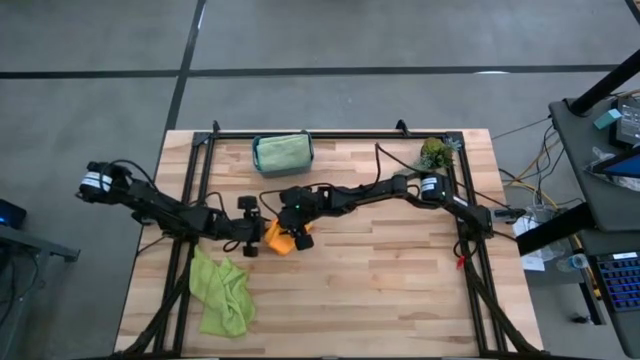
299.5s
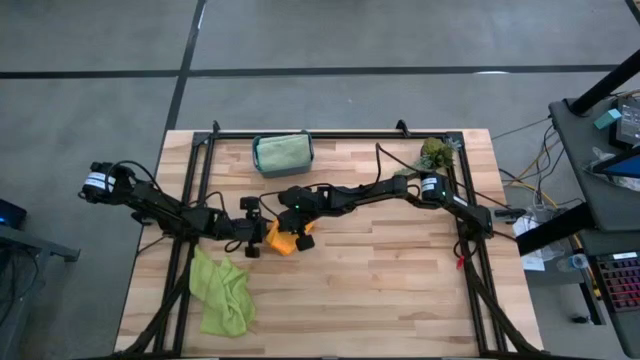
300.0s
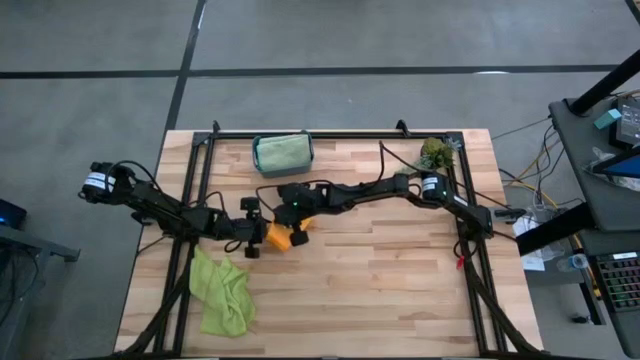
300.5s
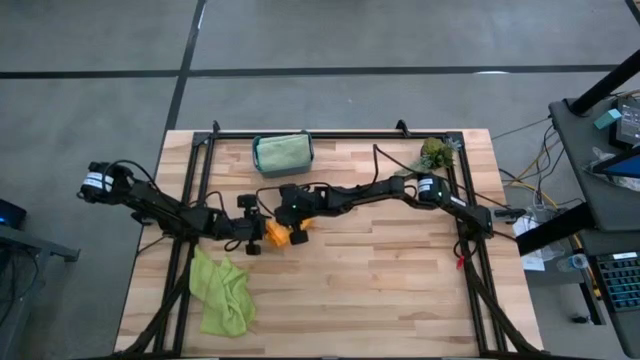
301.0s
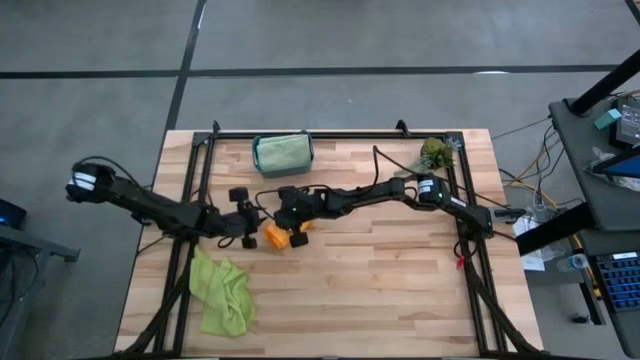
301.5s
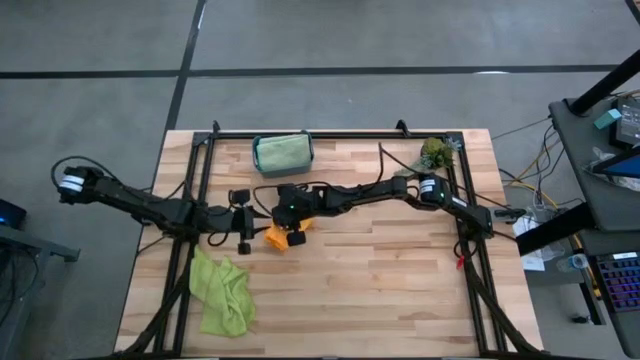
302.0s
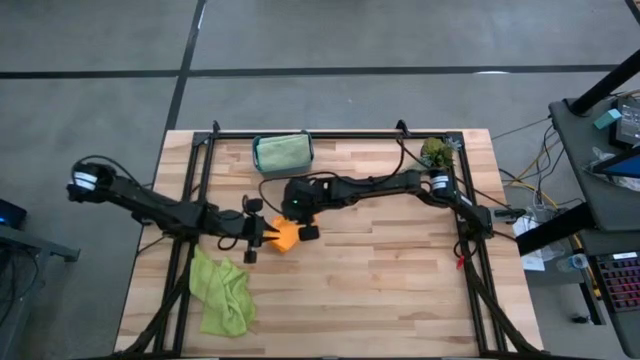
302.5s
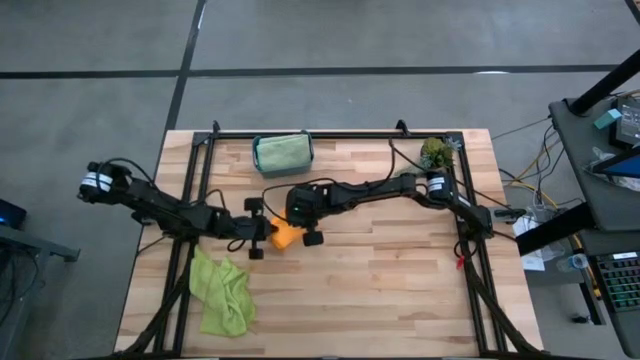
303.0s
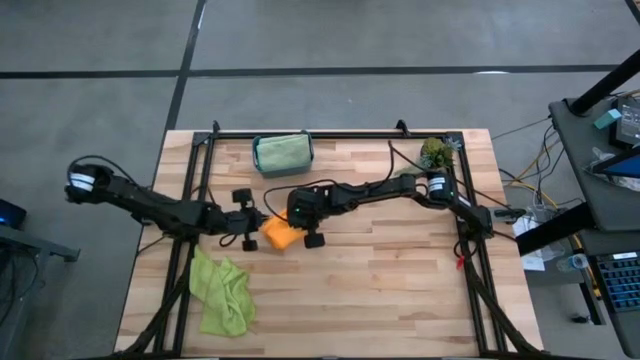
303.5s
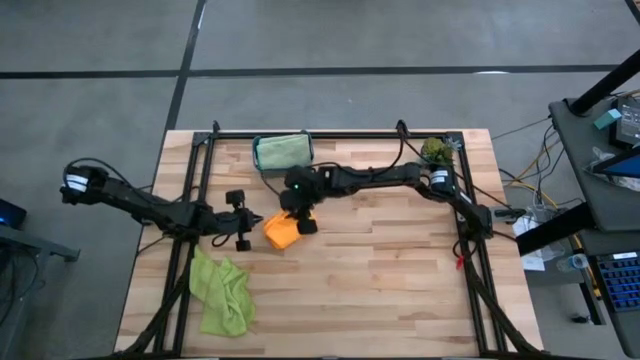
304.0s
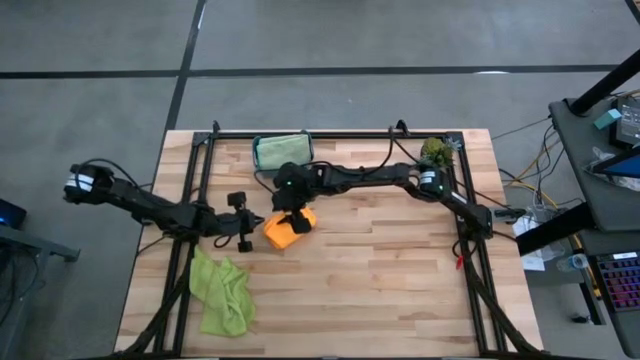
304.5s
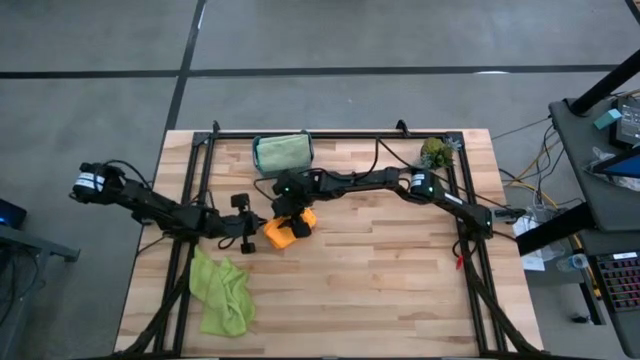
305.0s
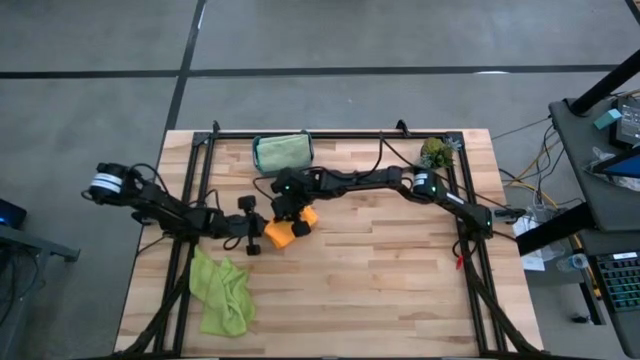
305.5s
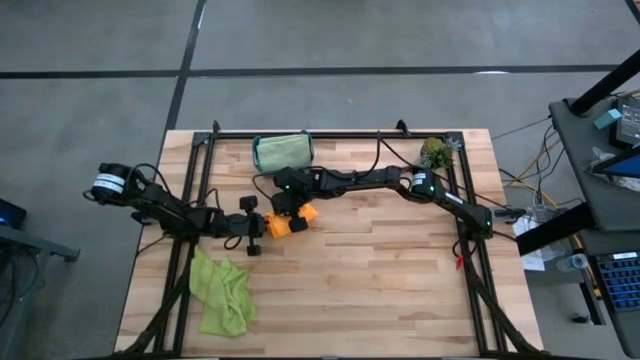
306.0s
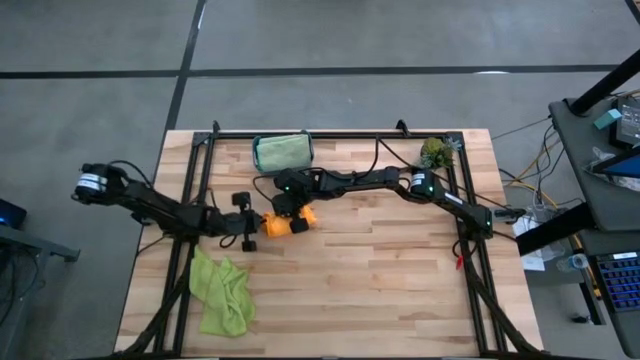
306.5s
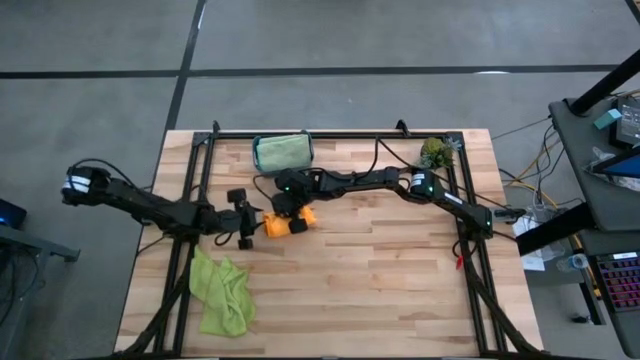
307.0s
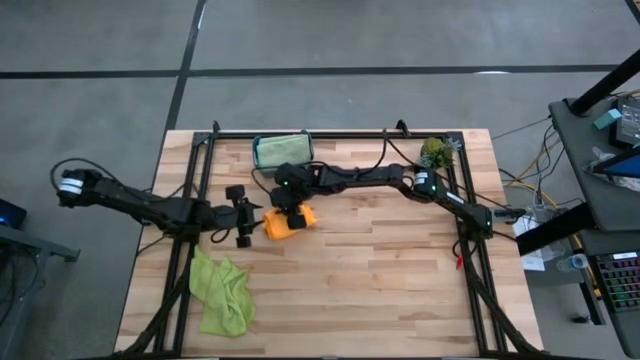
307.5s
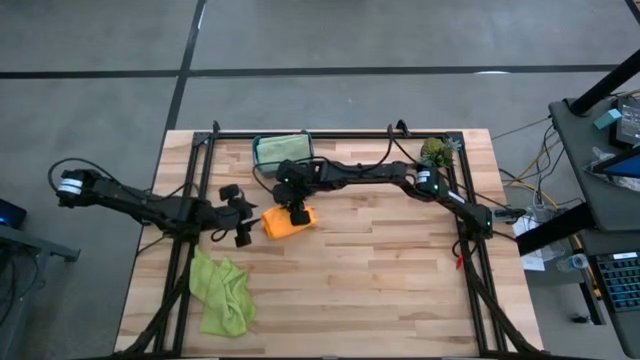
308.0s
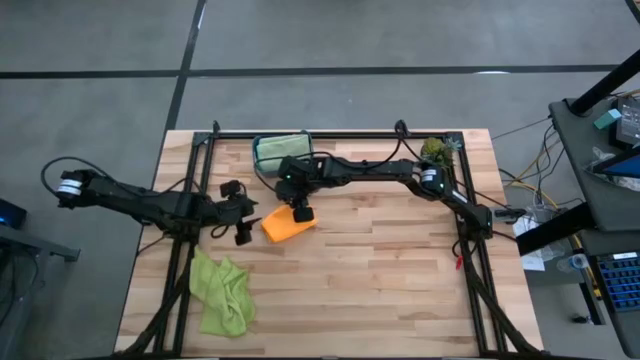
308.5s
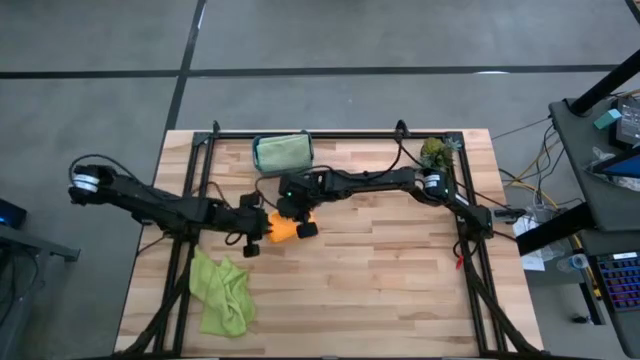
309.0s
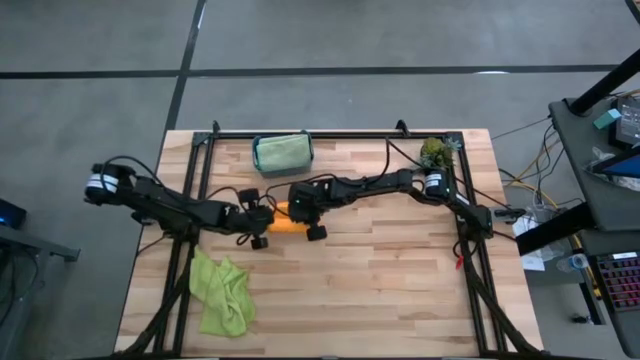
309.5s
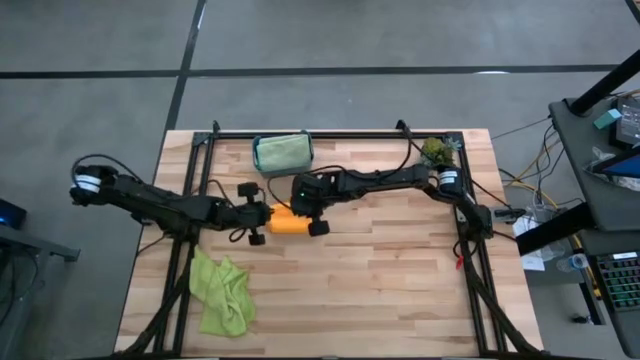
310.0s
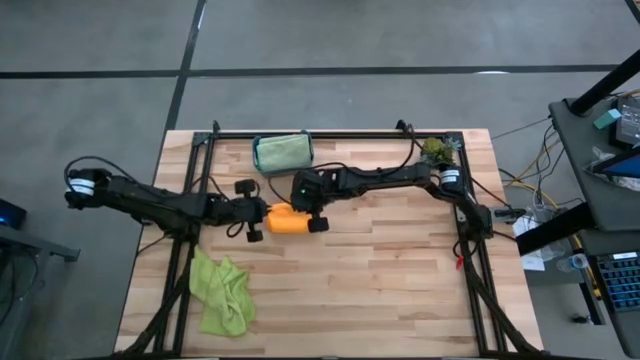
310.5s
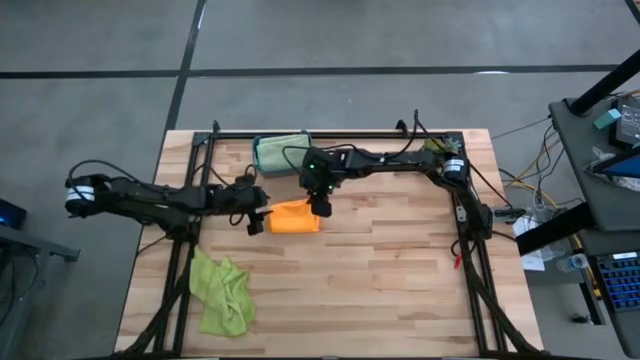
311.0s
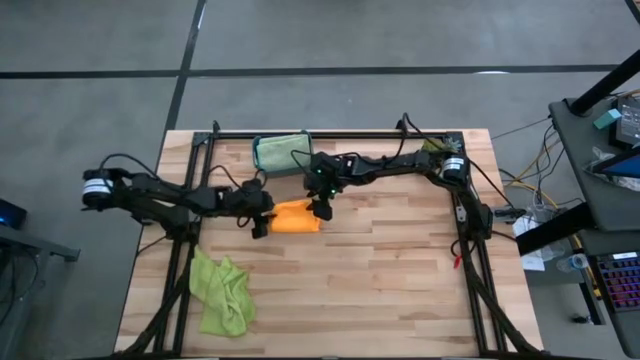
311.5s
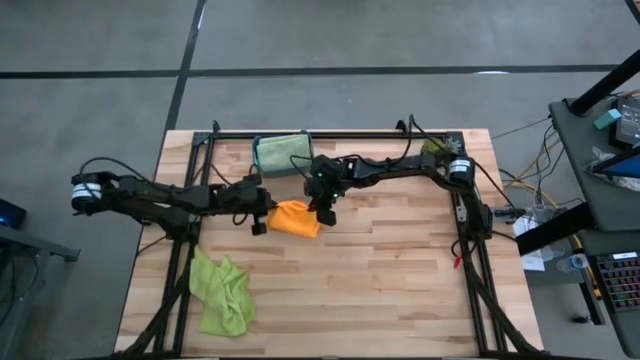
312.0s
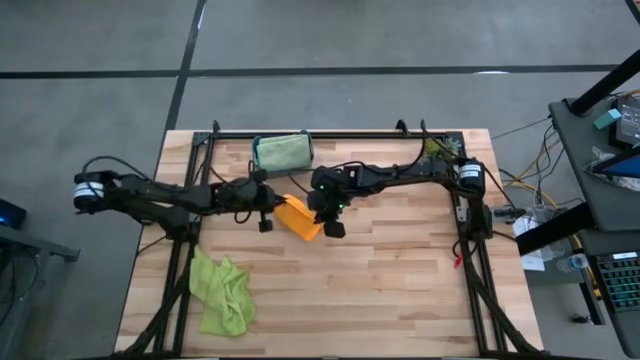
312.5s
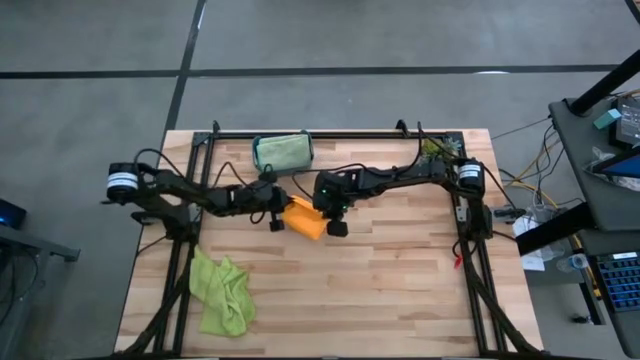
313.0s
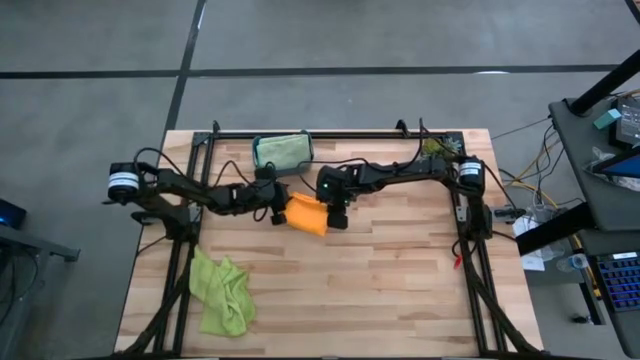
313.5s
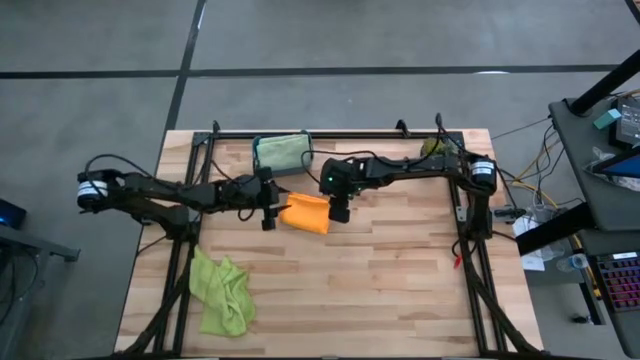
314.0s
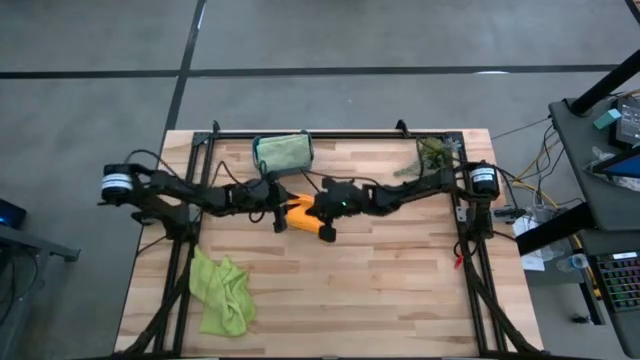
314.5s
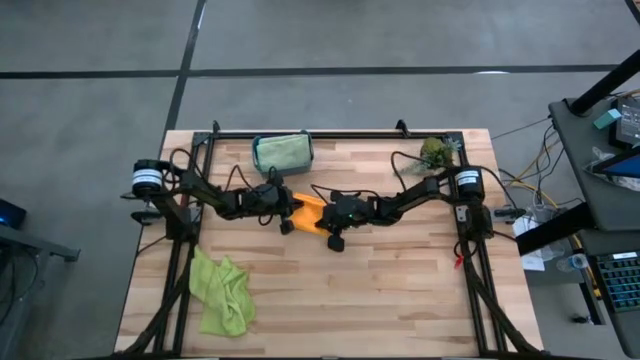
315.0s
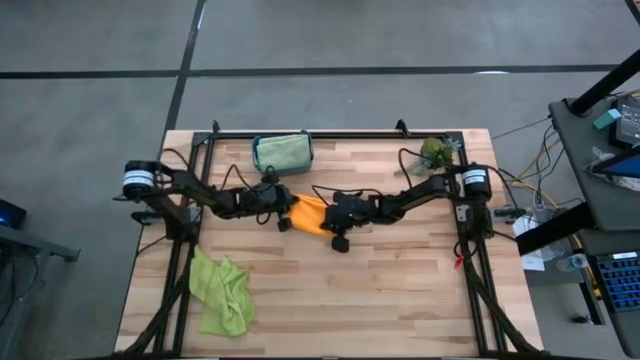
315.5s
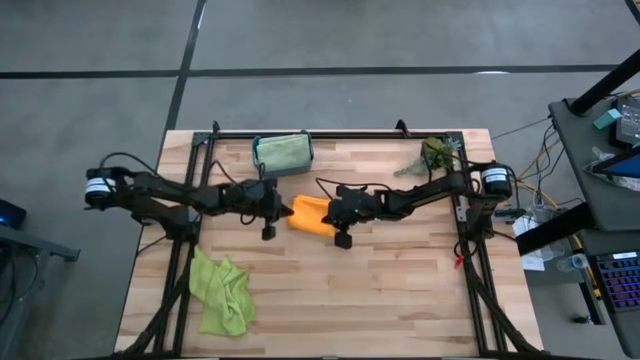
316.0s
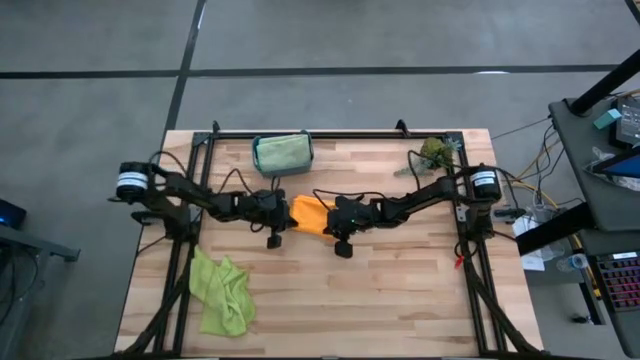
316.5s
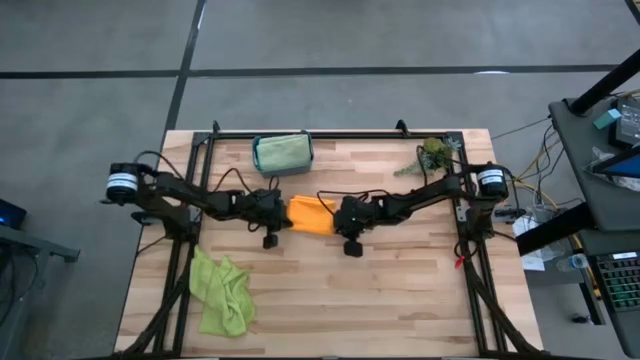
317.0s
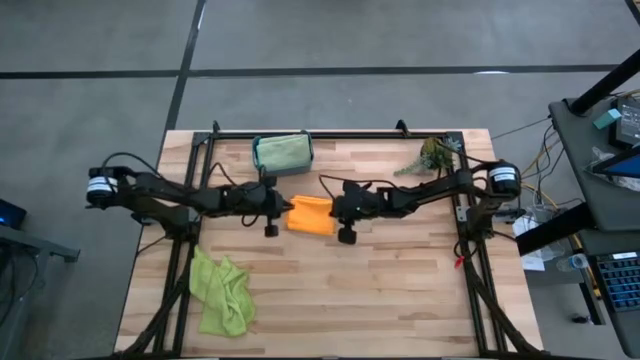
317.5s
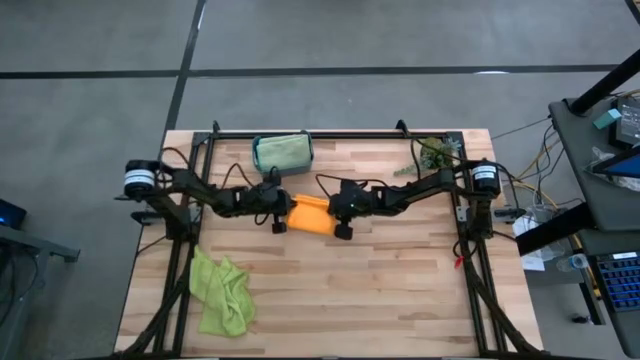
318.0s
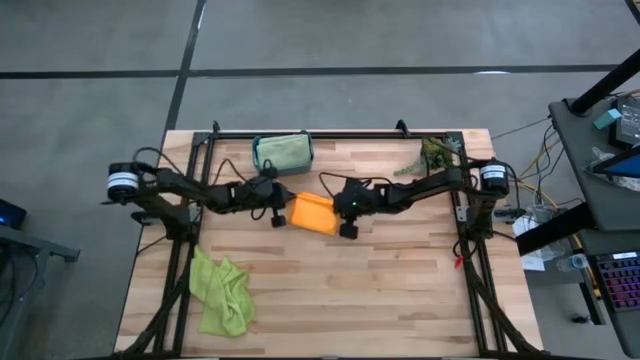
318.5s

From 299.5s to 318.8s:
Task: Fold microfiber towels
Fold the orange microfiber towel

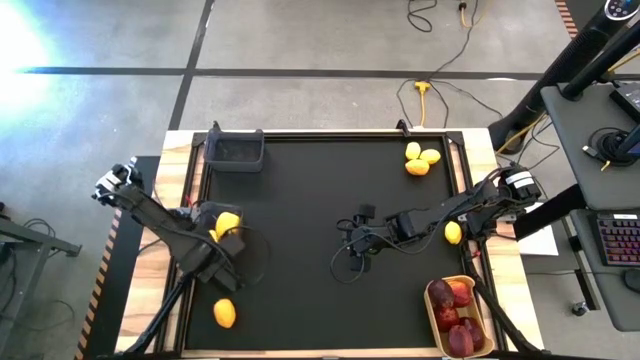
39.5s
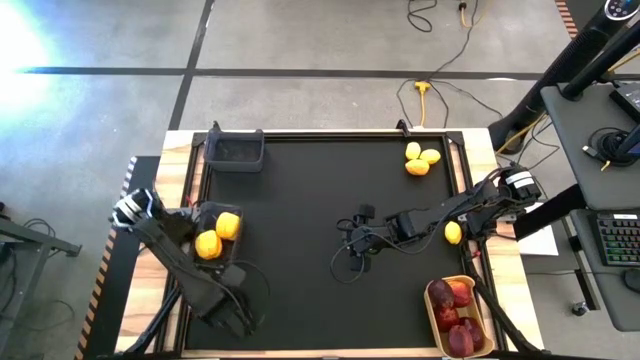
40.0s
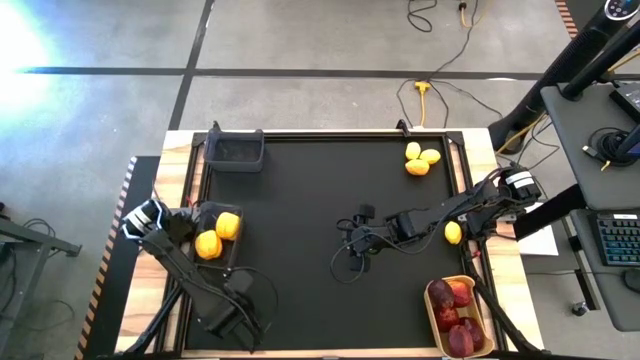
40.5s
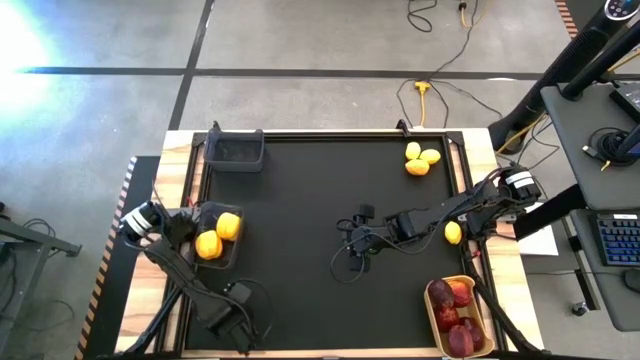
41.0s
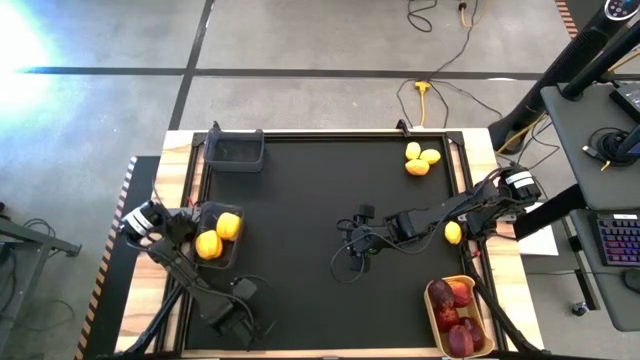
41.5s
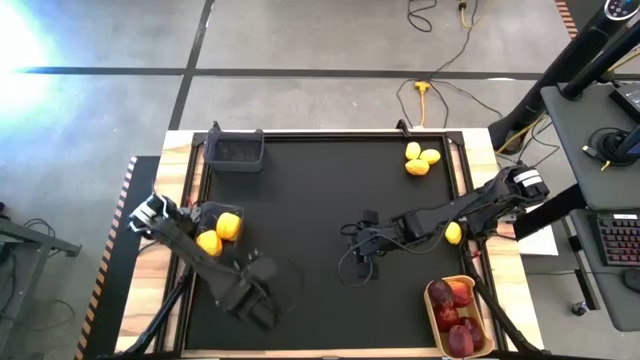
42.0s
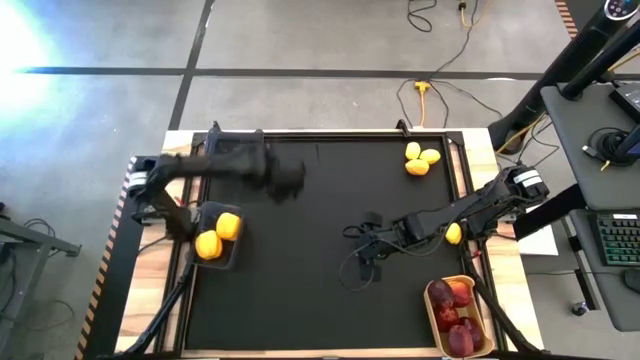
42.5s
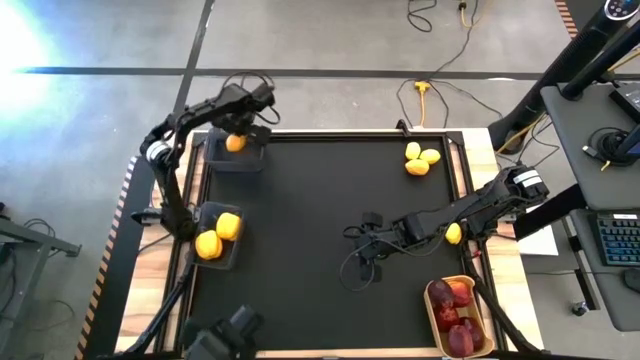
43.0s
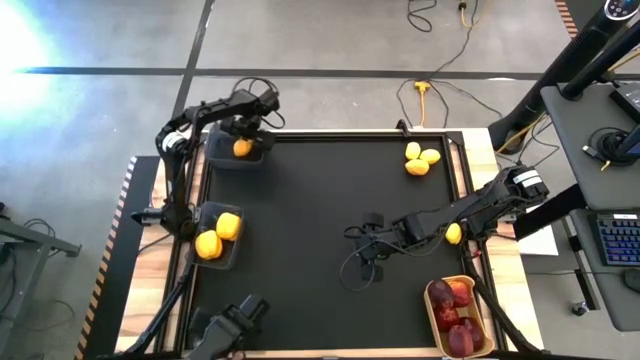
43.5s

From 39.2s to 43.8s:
Task: Sort produce into baskets
Put the lemon into the top black bin
